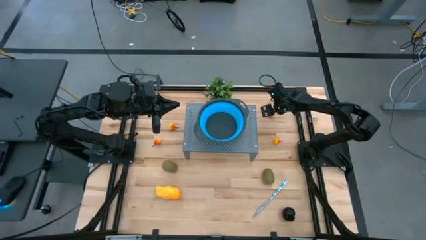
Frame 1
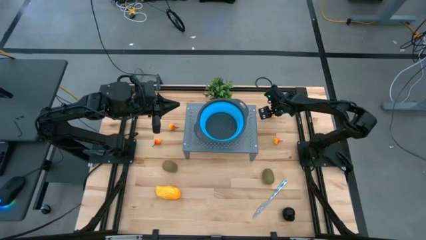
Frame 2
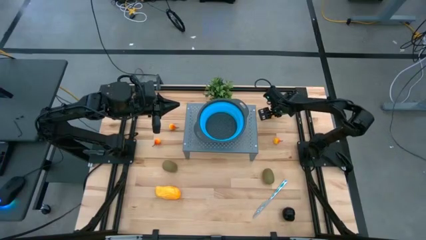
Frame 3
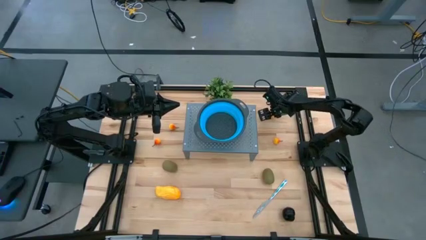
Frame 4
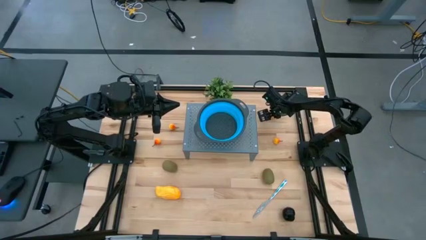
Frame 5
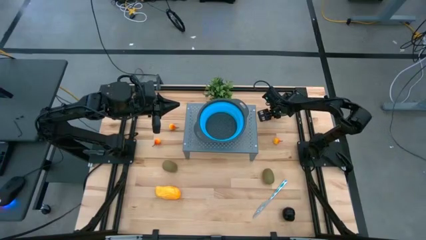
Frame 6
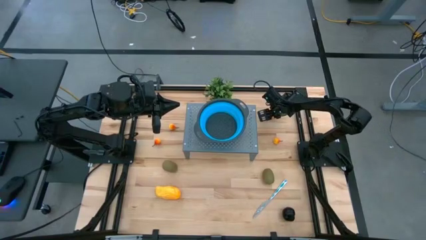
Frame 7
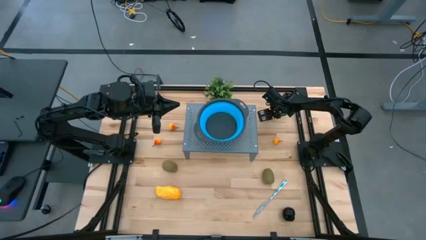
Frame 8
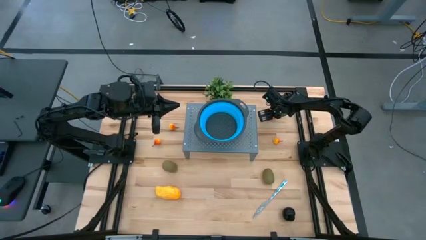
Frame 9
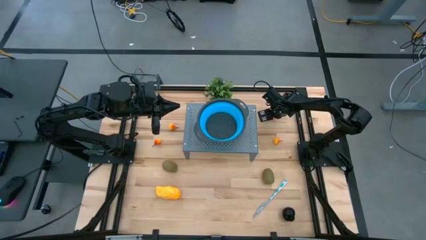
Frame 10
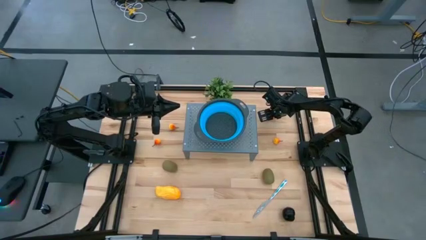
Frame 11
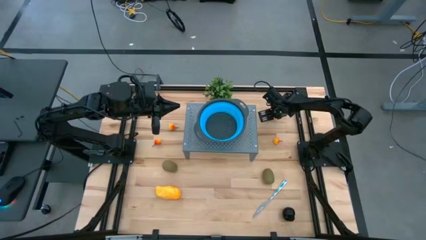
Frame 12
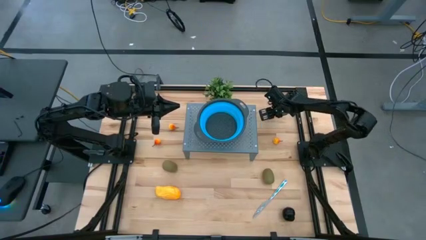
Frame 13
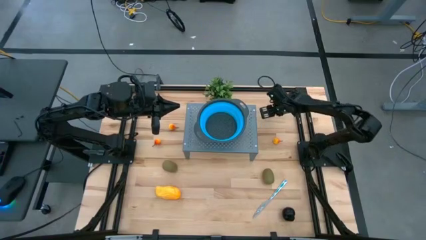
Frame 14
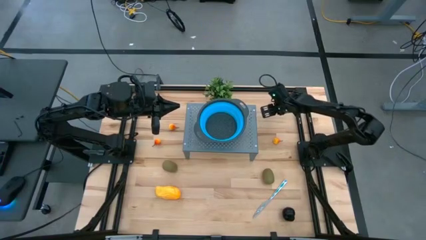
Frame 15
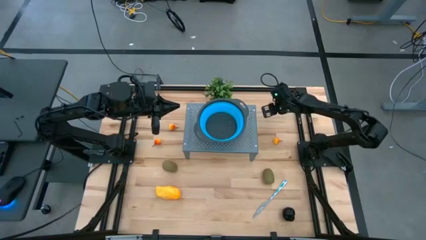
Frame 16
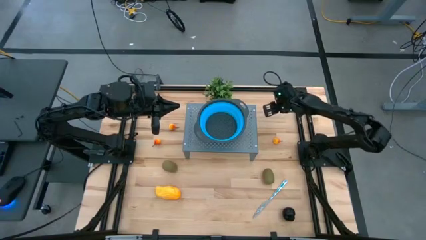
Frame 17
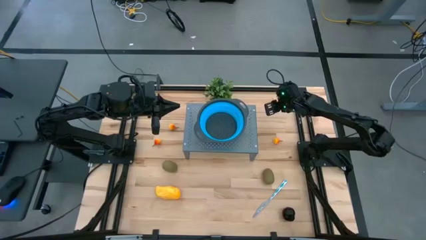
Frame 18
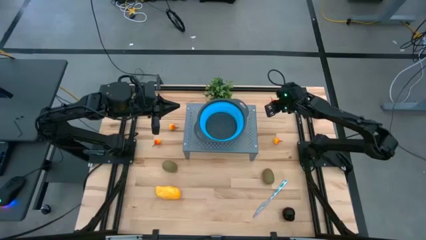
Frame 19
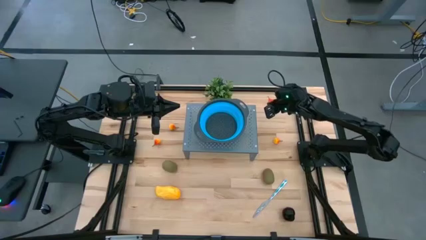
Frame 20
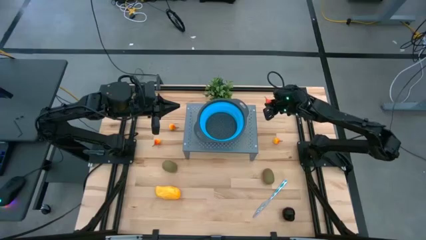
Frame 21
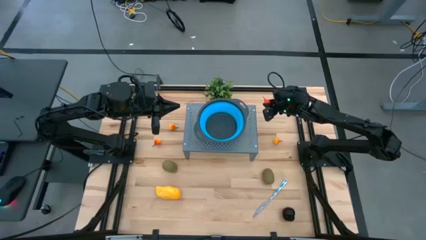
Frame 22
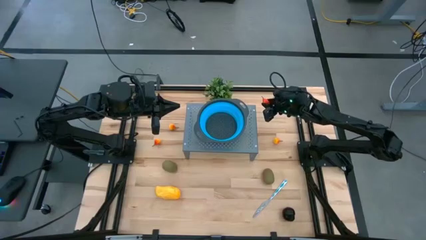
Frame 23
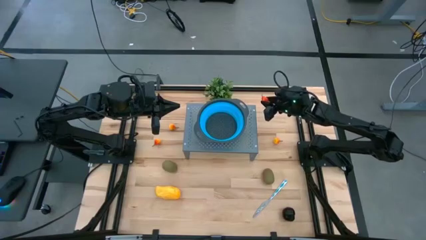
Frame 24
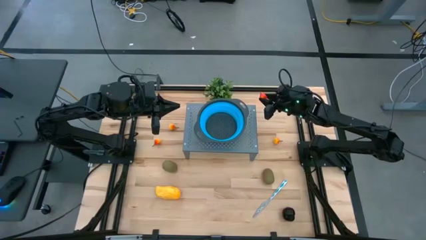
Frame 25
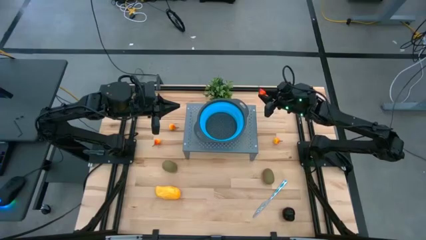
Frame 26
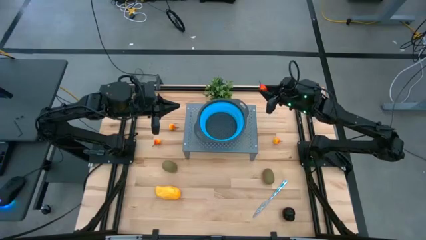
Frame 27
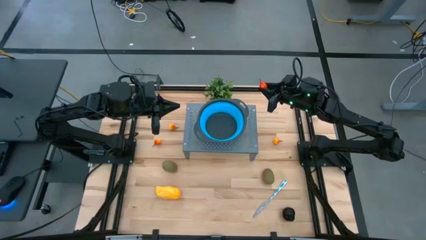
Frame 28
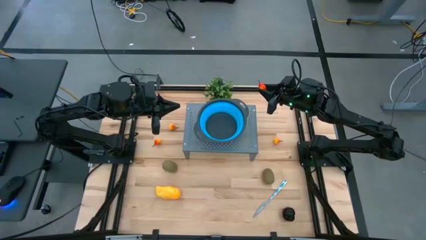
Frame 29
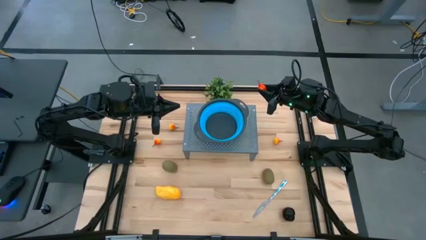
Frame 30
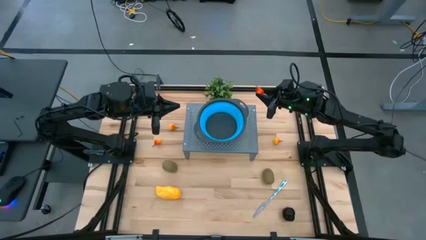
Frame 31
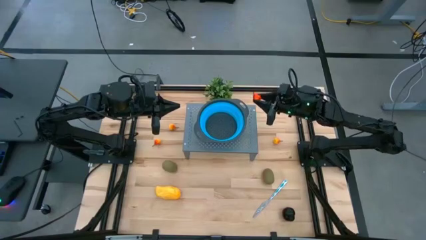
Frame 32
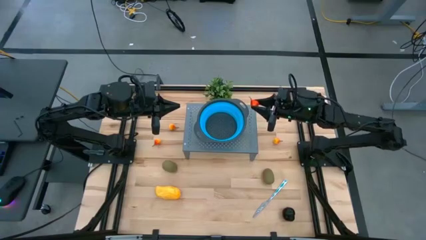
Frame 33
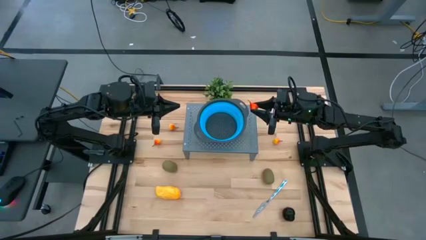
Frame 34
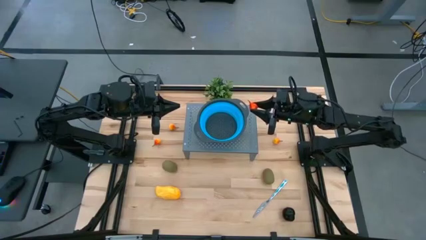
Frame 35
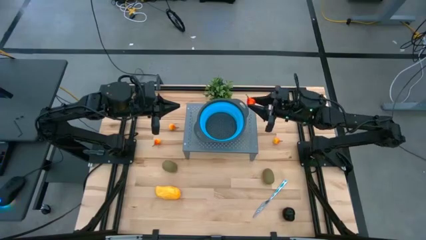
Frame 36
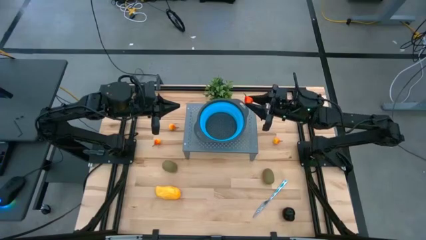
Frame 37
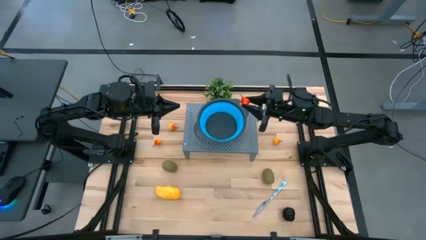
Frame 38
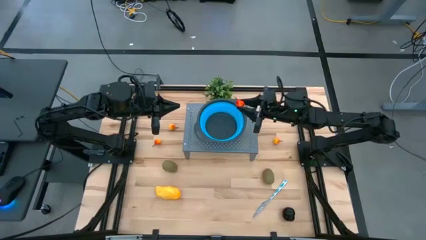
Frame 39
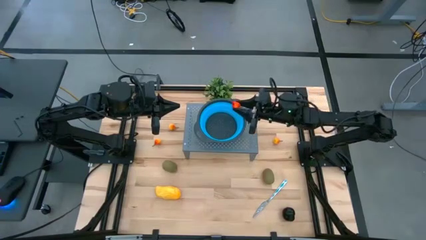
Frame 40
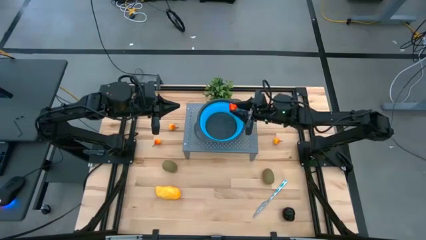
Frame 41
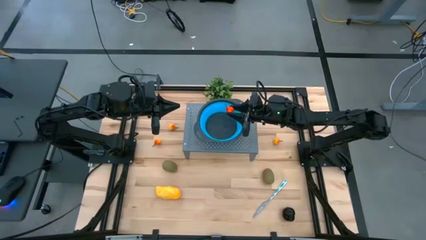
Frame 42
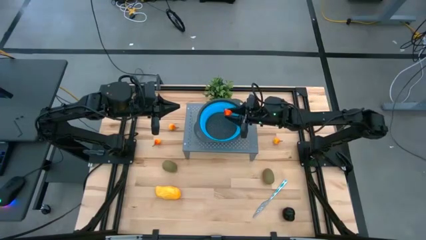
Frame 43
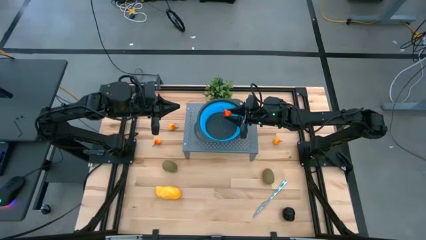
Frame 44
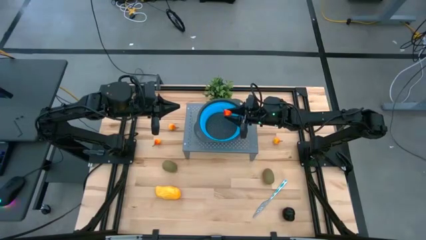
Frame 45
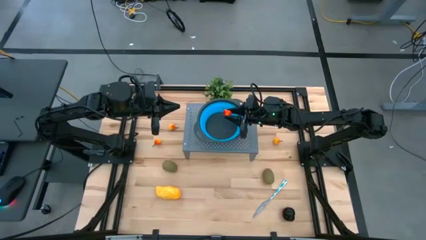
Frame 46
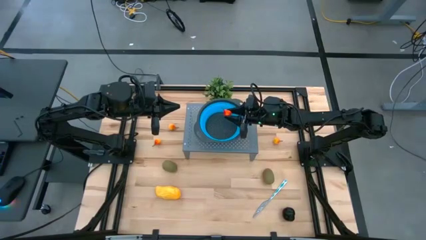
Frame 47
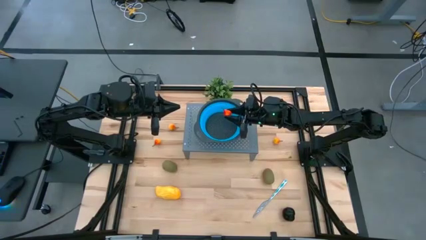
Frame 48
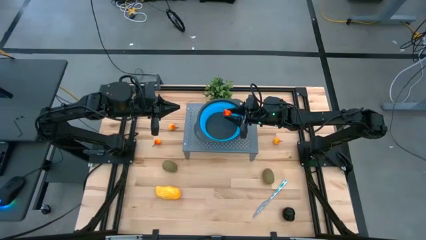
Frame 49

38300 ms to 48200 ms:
Task: Pick & Place Fruit
Put the orange pear into the strainer bowl on the shelf

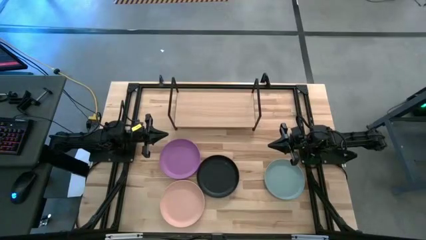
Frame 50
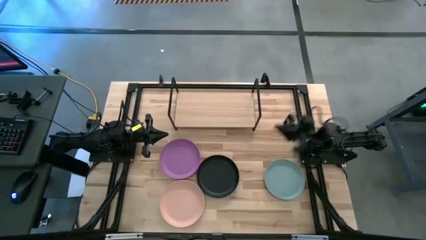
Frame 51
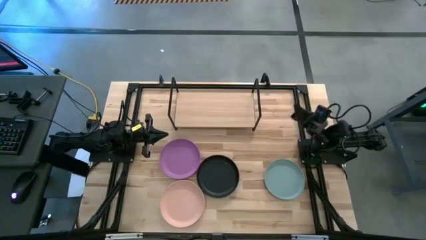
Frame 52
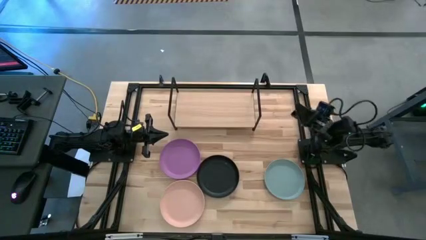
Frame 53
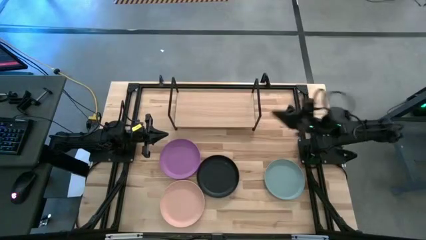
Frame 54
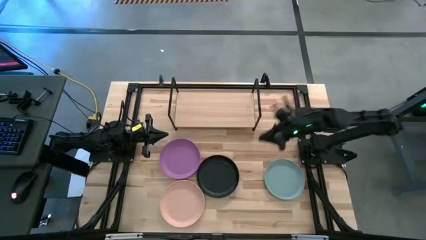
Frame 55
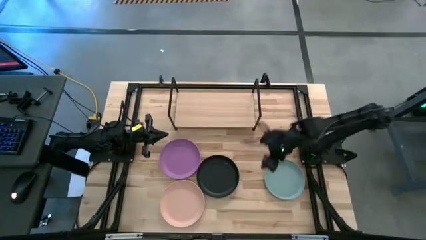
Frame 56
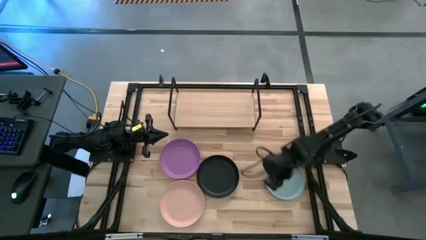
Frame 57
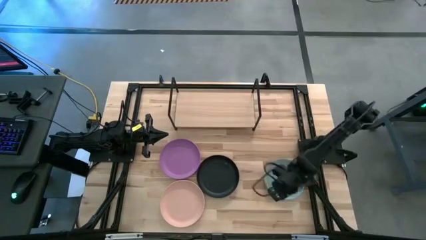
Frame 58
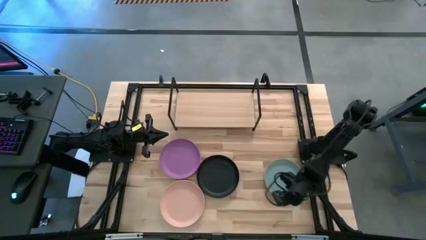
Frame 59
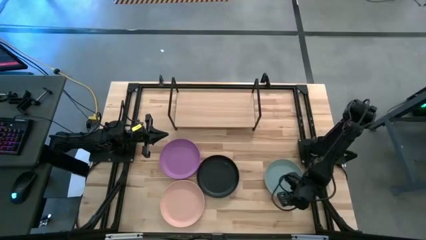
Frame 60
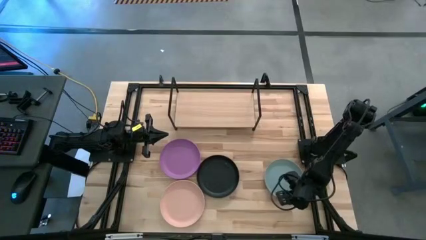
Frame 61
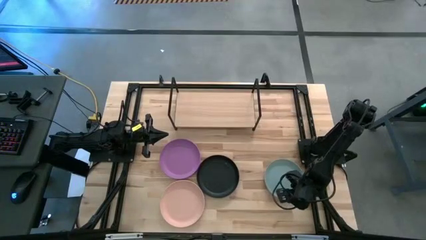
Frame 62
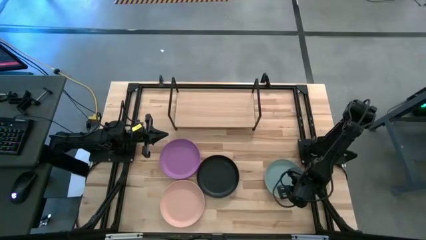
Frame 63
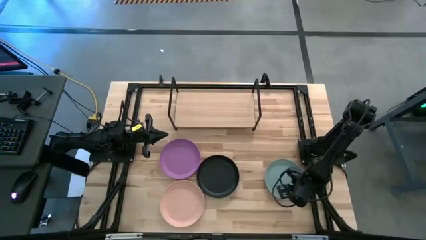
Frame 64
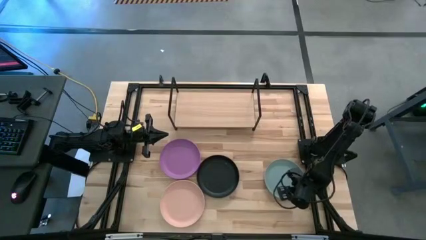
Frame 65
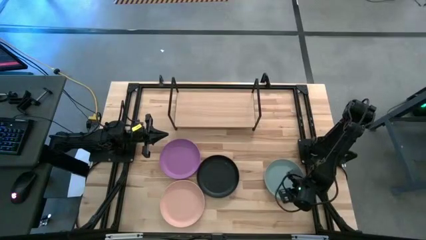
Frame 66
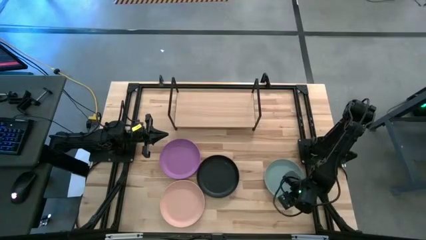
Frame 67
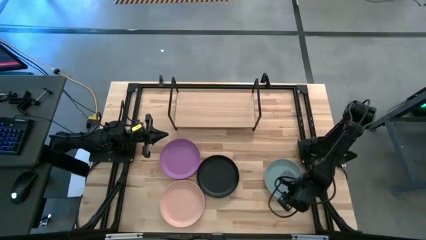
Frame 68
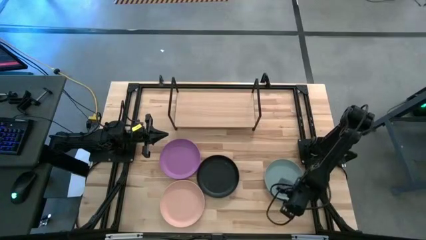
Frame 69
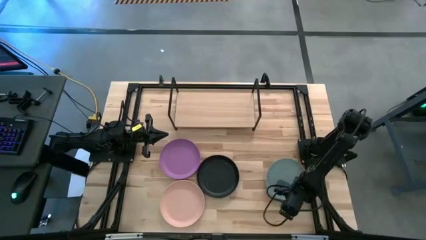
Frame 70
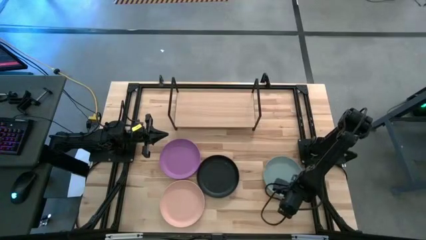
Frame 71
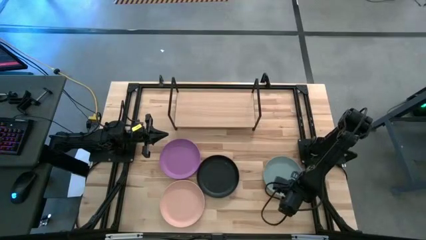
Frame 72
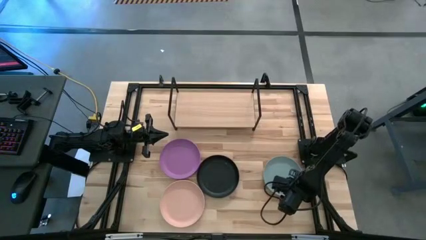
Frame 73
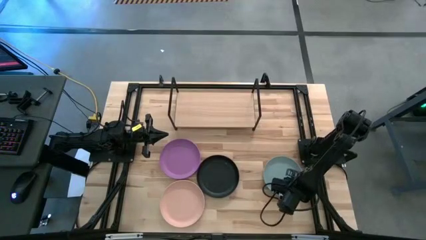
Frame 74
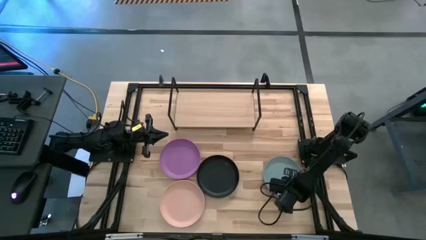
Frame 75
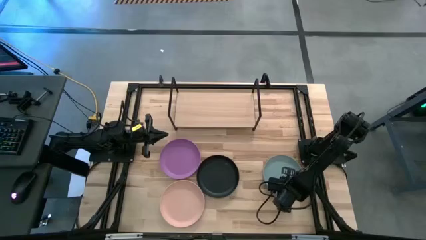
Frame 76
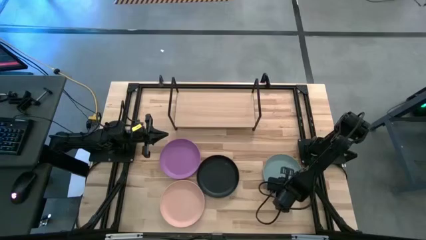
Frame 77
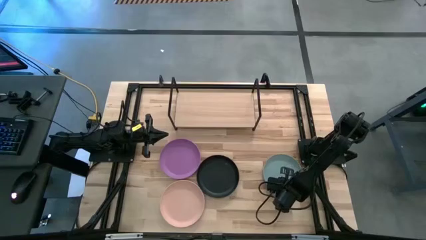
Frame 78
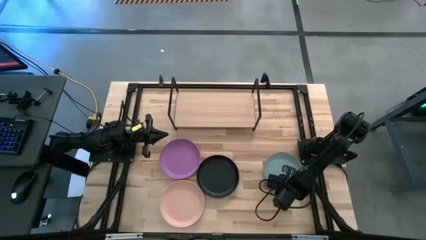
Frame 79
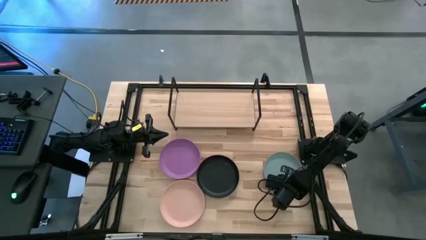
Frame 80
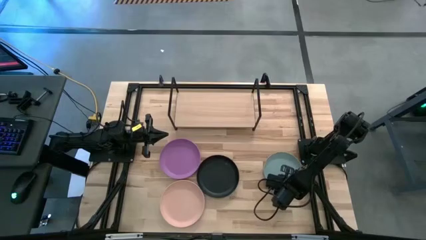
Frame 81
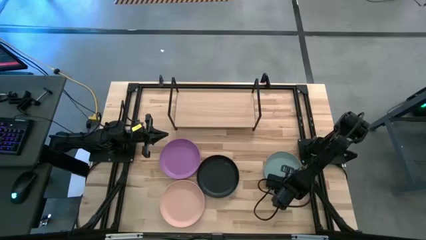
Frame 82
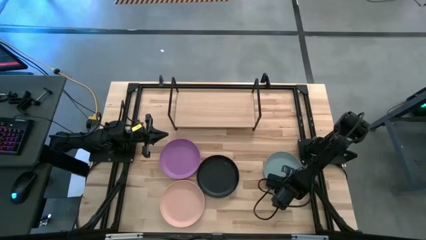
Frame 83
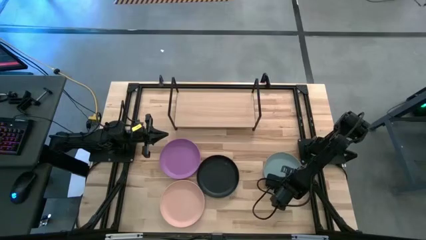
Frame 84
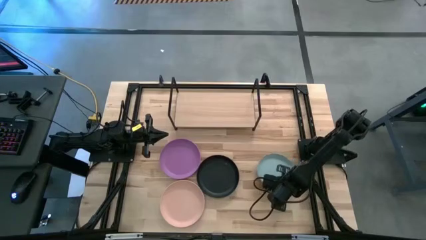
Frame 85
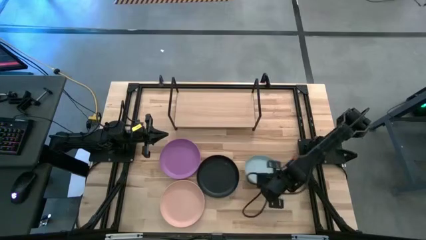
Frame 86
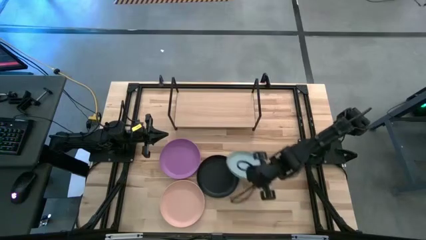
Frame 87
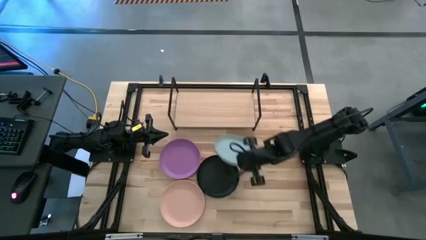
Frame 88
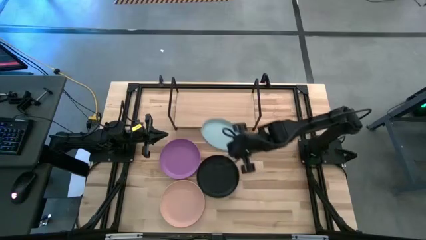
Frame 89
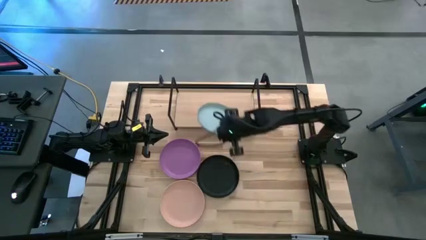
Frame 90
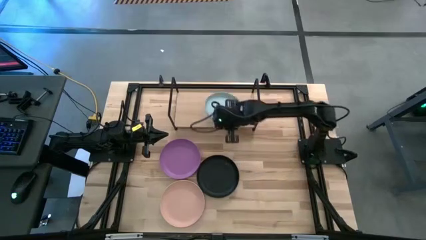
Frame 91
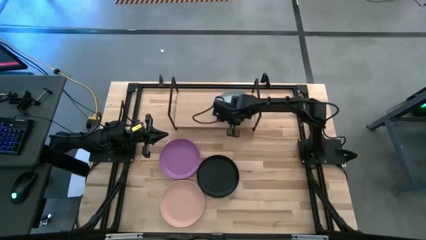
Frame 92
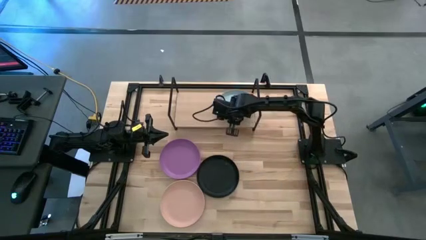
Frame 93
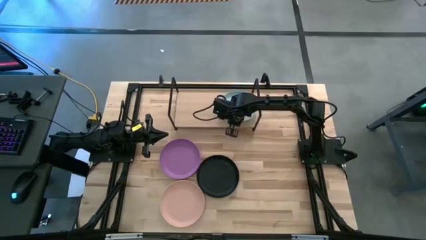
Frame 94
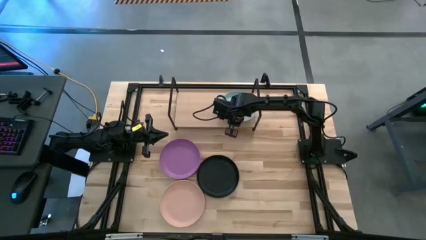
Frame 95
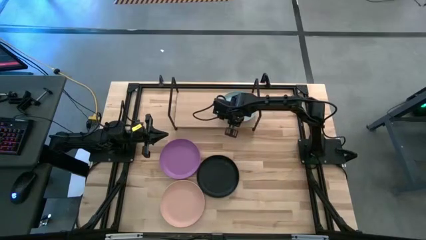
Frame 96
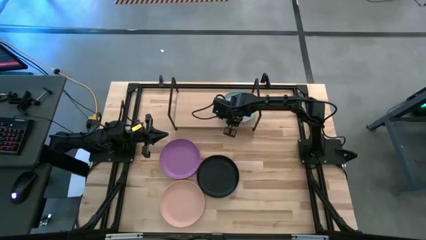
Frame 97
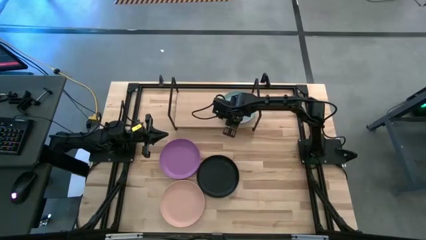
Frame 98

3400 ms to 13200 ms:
Task: Place and stack plates onto a shelf
Put the gray plate on the shelf
